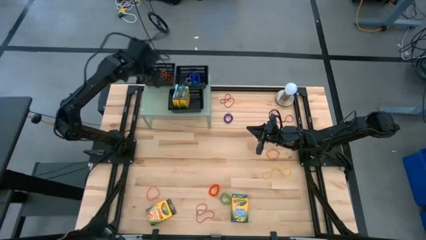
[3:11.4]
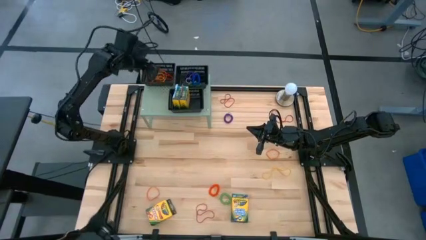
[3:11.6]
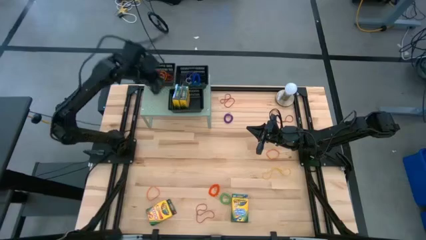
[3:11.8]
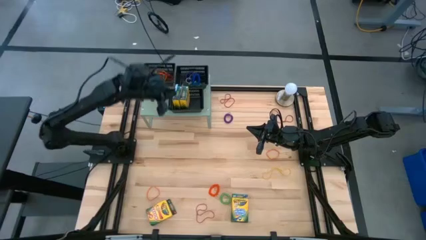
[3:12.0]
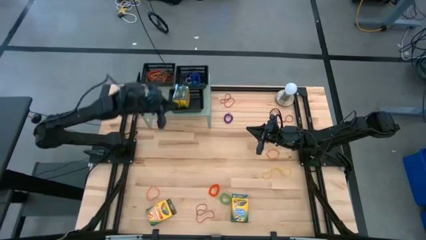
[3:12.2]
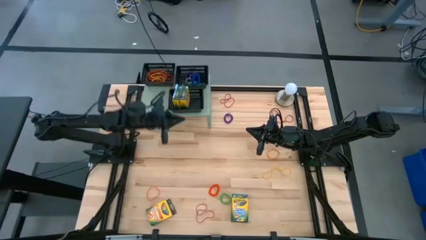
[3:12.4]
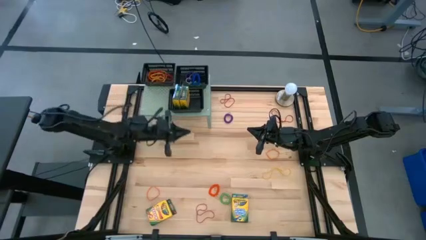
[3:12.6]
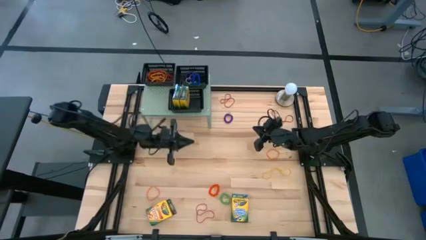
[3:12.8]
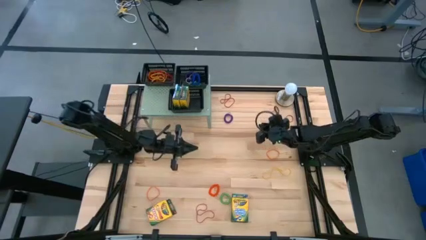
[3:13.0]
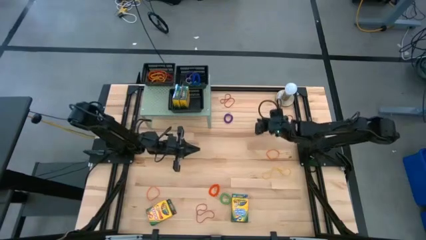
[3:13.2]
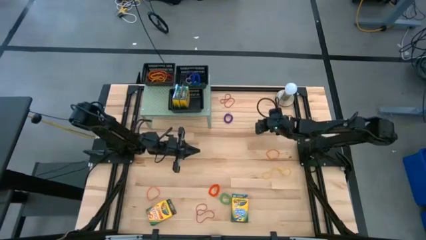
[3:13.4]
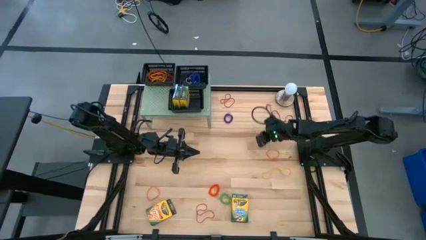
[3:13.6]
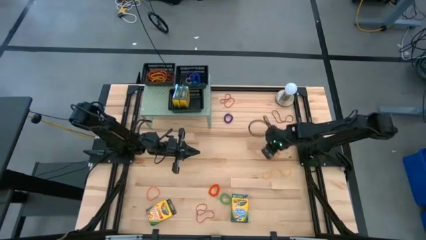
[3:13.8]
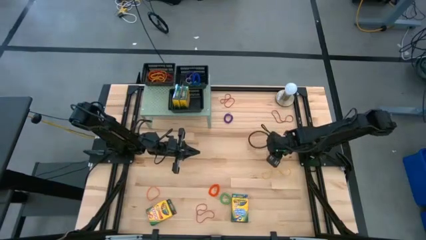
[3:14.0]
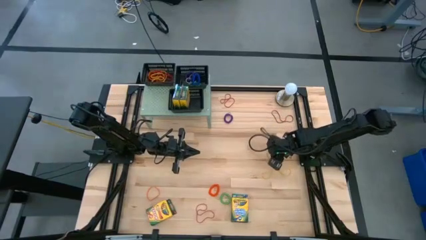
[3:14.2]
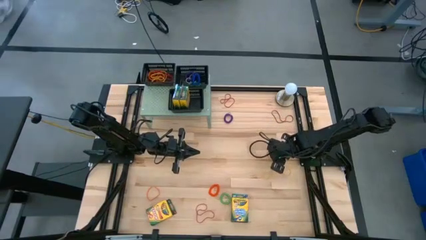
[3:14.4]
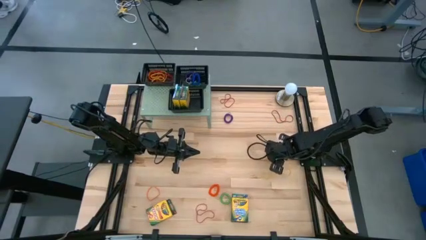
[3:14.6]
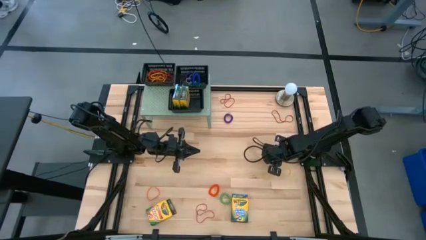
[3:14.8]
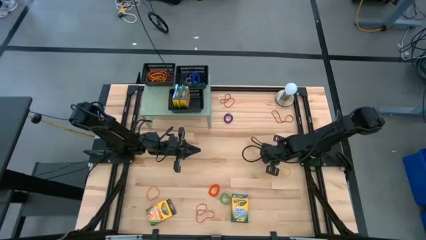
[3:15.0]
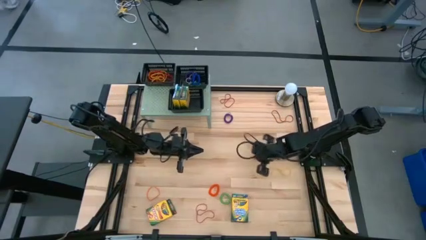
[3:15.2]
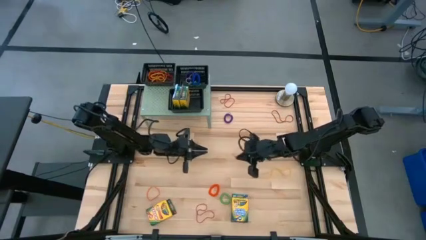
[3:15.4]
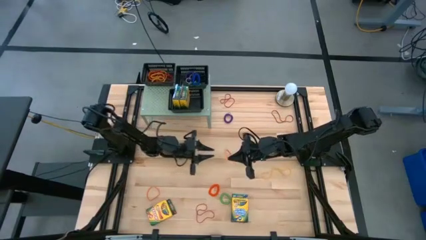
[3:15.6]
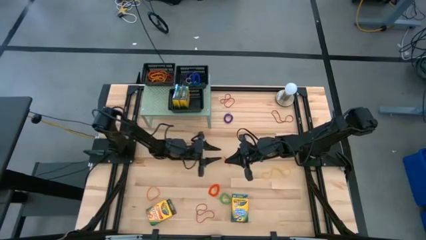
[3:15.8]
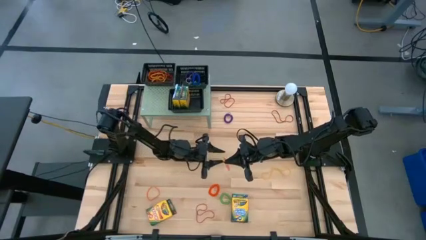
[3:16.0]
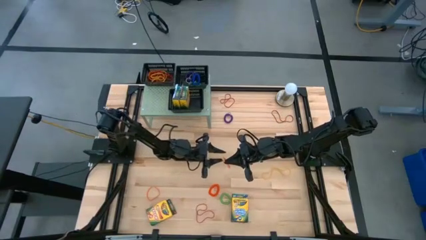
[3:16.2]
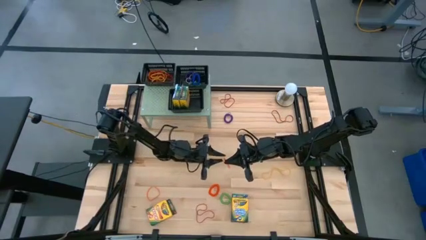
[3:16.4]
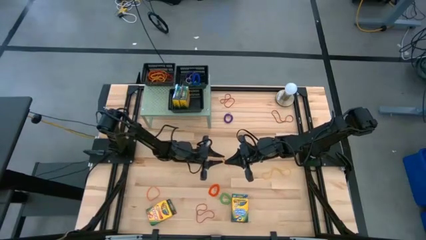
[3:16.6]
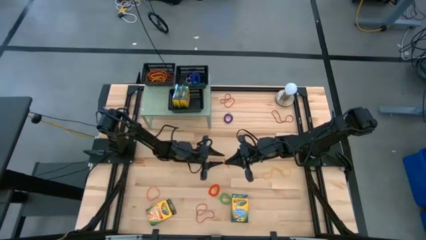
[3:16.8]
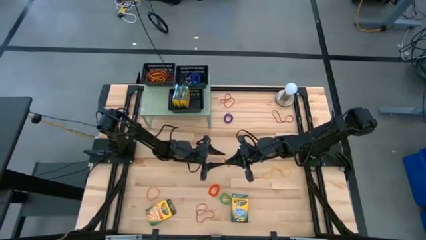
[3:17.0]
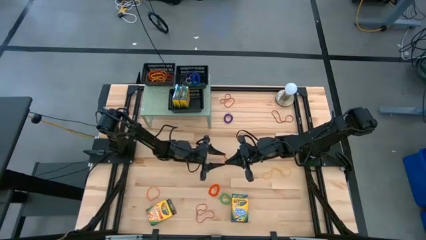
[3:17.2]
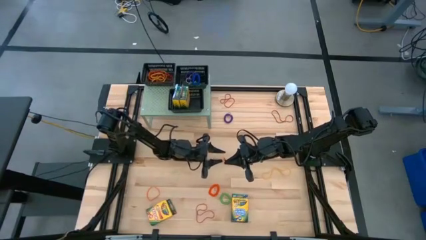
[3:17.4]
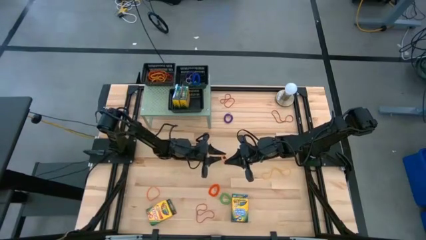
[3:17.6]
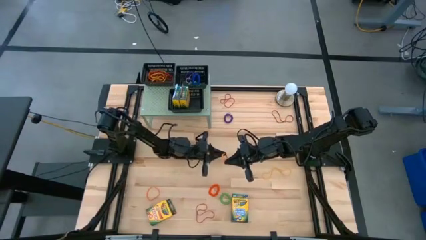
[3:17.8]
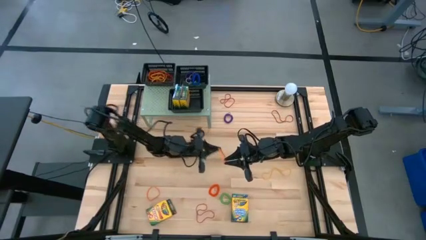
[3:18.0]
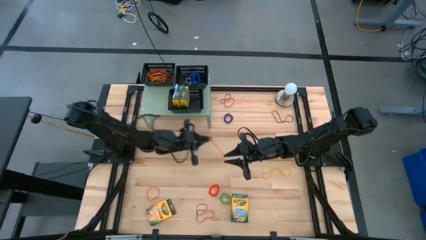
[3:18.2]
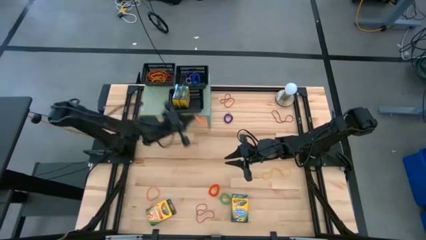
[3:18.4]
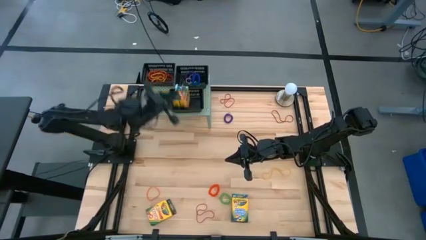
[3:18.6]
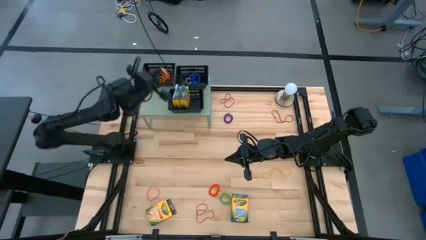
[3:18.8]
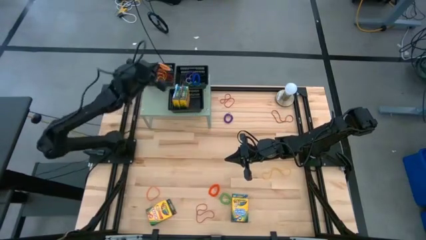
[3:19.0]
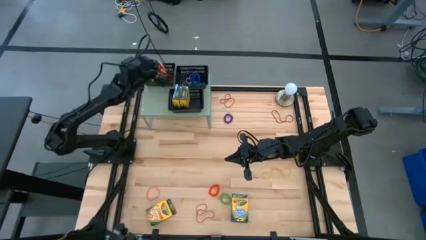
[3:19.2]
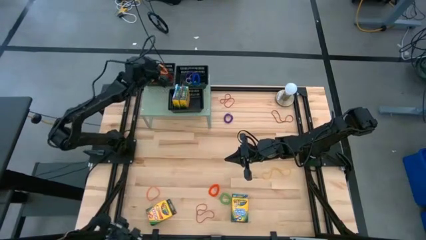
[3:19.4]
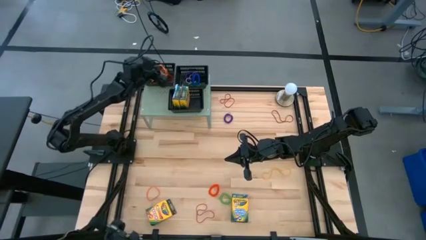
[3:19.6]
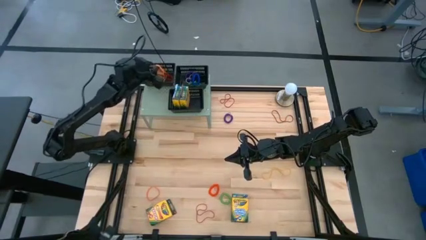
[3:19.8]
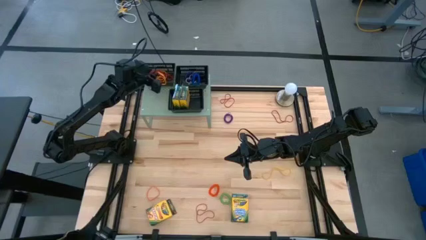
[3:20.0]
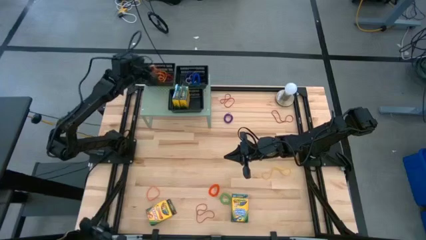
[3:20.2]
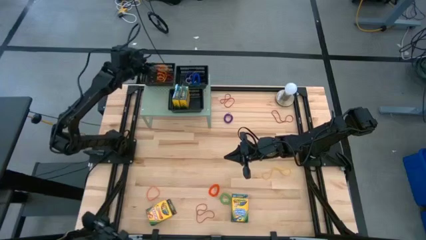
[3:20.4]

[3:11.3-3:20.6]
Task: Pick & Place Office Desk Supplies
Put the orange rubber band into the top left black bin on the shelf

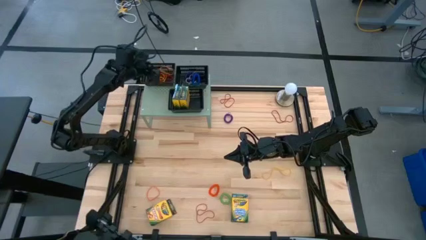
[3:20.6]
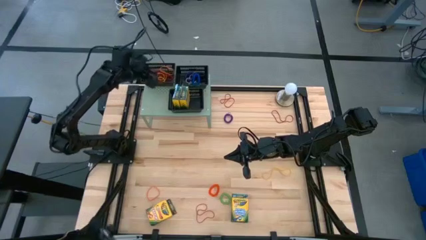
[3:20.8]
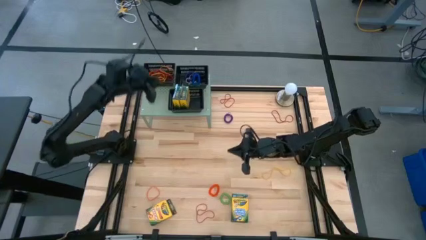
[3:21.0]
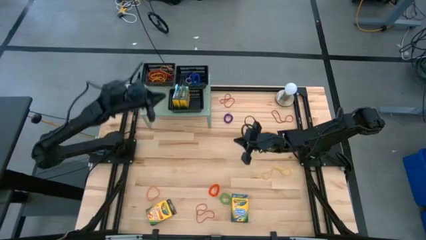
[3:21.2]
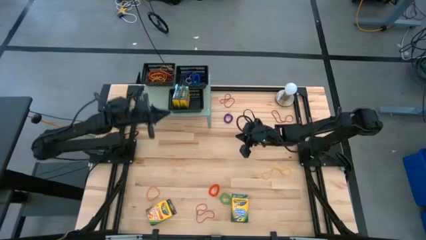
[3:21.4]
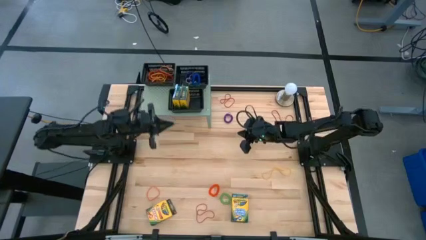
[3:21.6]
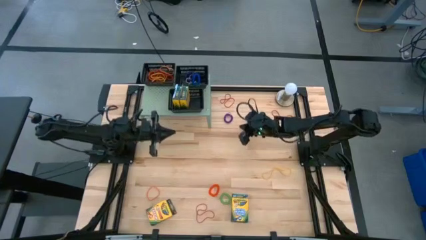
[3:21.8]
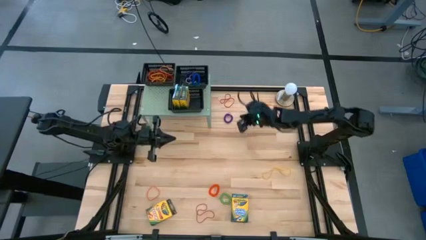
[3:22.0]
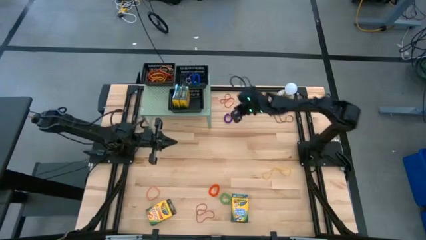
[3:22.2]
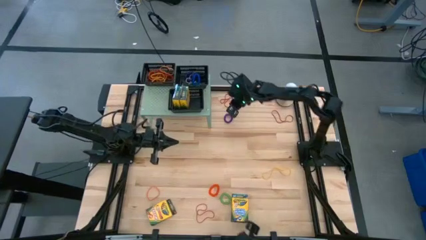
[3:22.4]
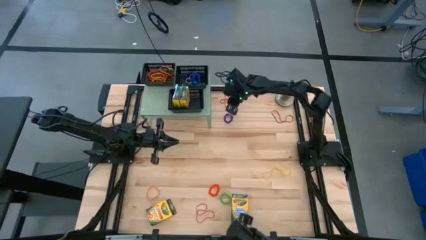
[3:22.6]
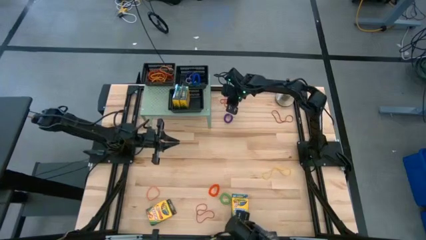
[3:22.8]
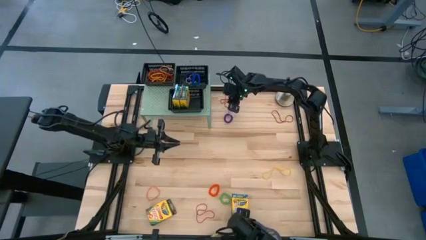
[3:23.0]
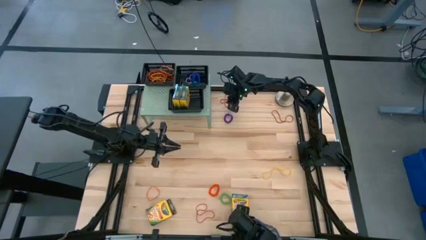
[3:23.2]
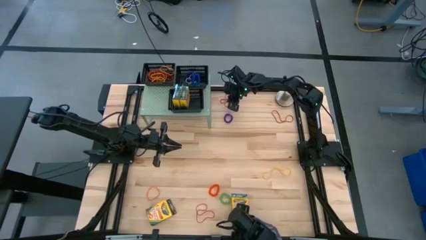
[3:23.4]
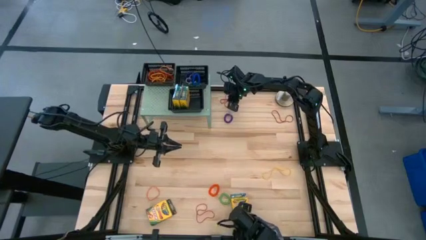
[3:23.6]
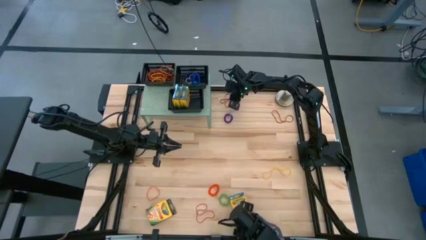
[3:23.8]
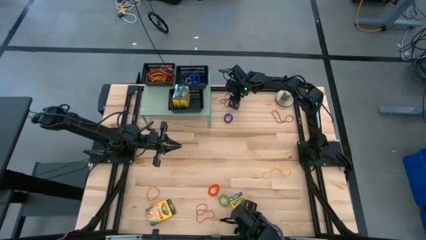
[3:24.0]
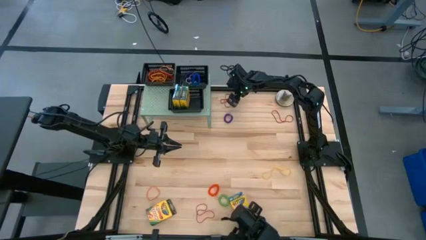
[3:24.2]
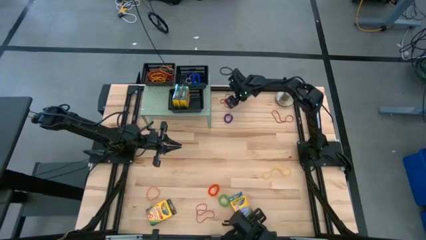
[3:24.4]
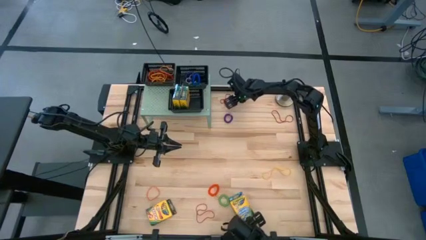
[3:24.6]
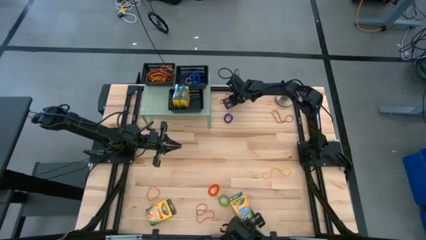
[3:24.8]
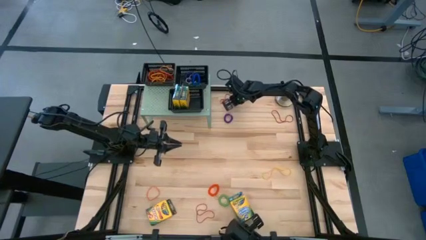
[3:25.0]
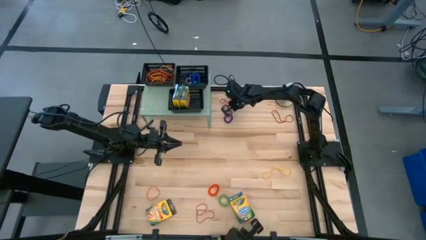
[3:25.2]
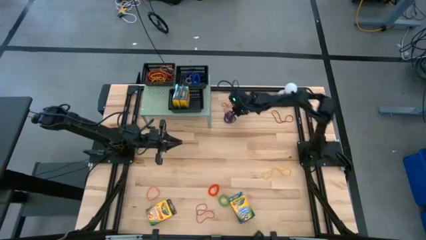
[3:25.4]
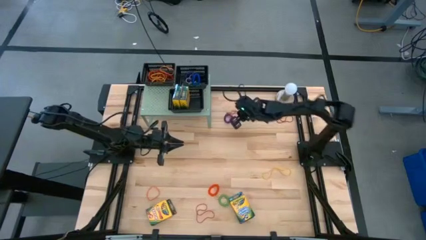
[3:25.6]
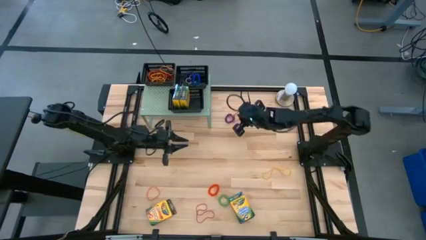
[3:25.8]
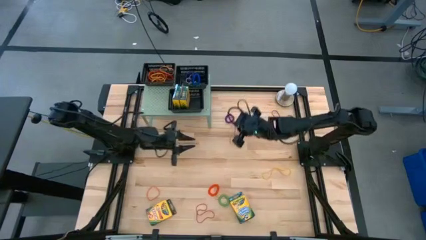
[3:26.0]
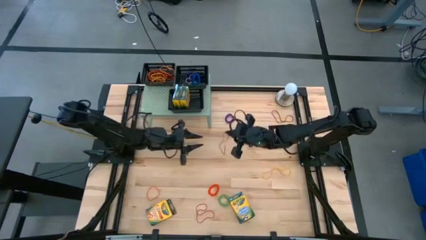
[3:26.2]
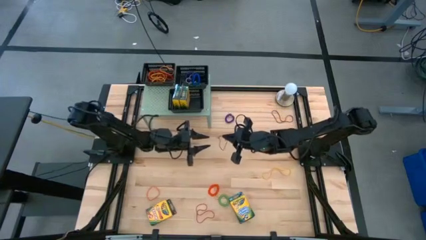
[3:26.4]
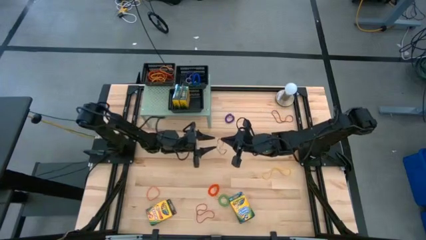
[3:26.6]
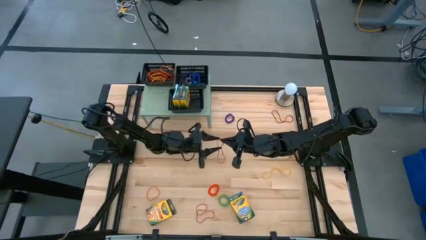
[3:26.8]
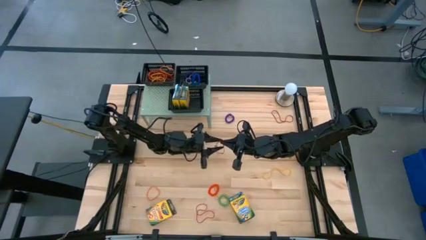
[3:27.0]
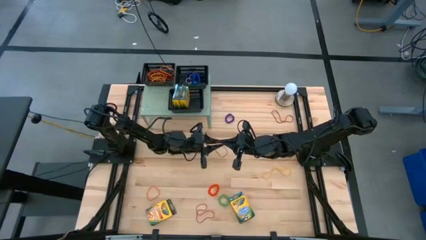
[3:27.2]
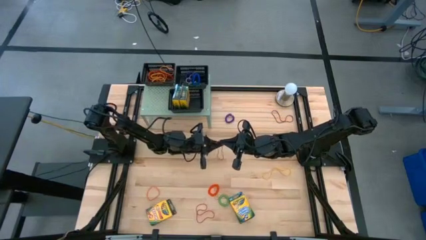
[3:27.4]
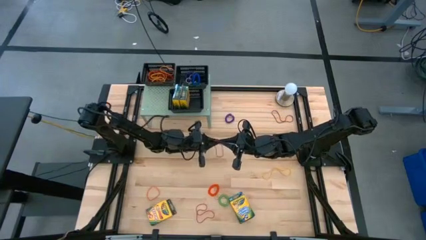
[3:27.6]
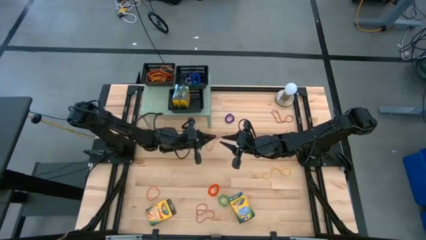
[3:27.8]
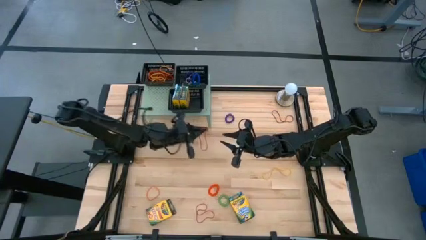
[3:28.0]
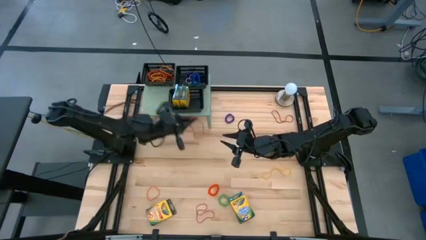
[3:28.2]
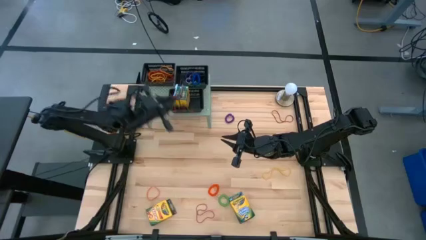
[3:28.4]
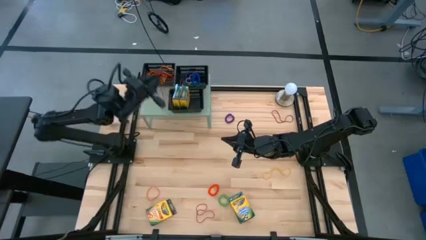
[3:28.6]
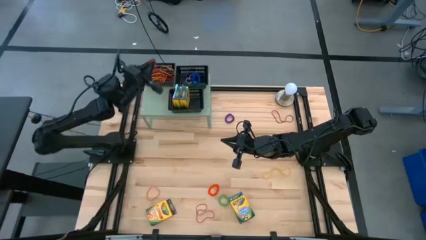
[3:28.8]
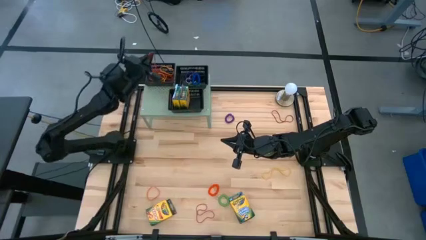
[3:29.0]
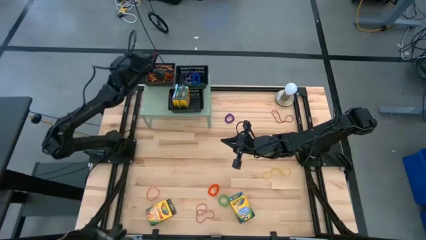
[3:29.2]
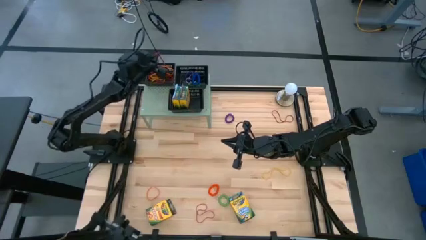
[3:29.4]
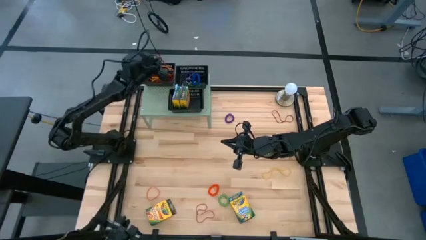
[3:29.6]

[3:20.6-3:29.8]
Put the red rubber band into the top left black bin on the shelf
